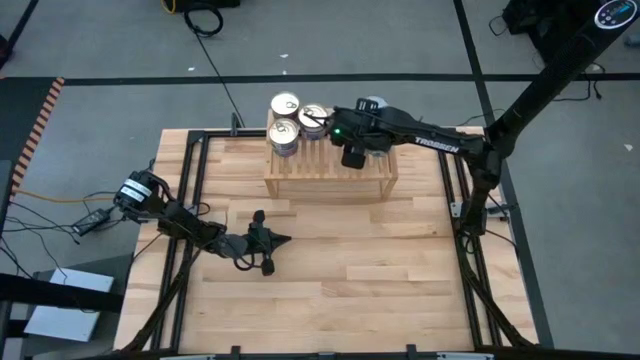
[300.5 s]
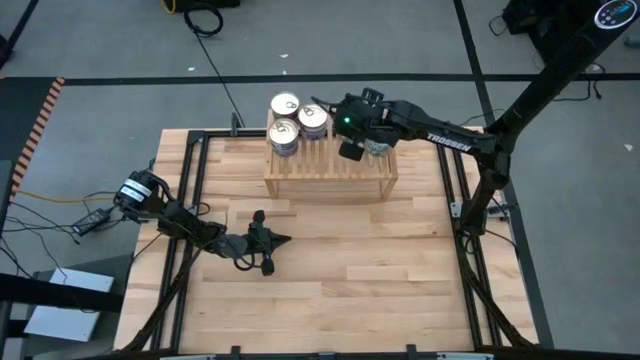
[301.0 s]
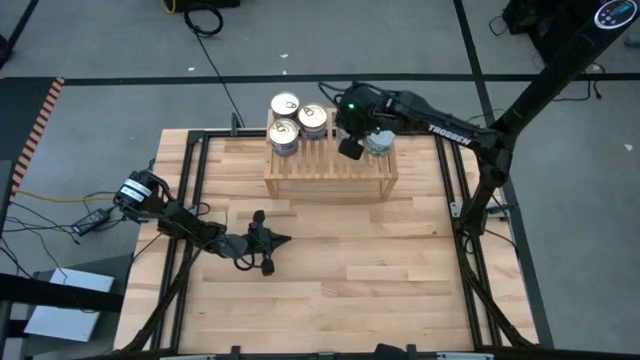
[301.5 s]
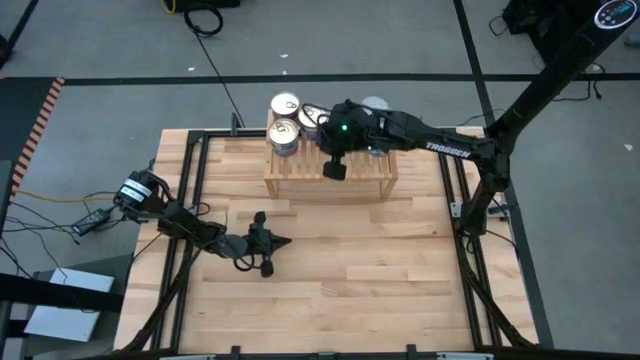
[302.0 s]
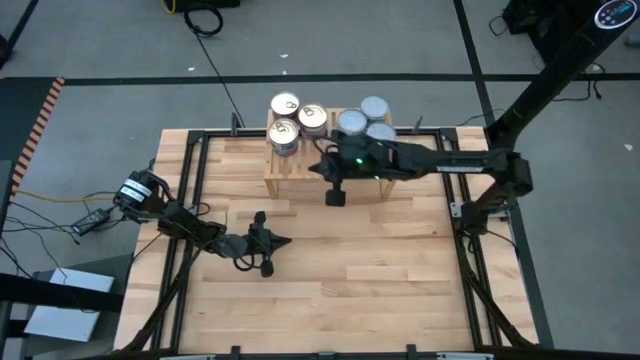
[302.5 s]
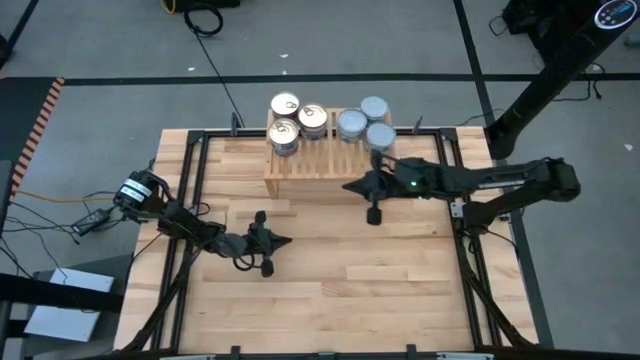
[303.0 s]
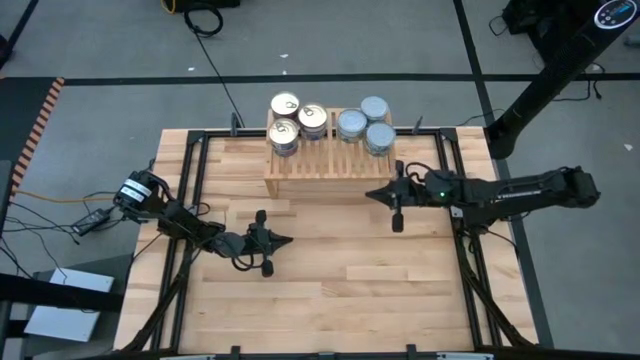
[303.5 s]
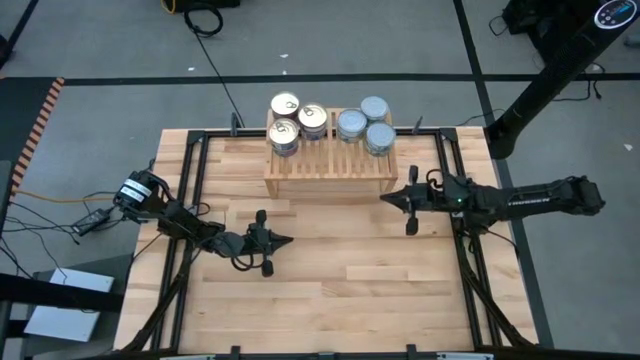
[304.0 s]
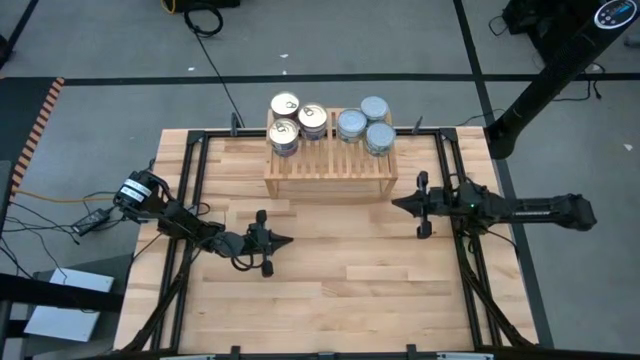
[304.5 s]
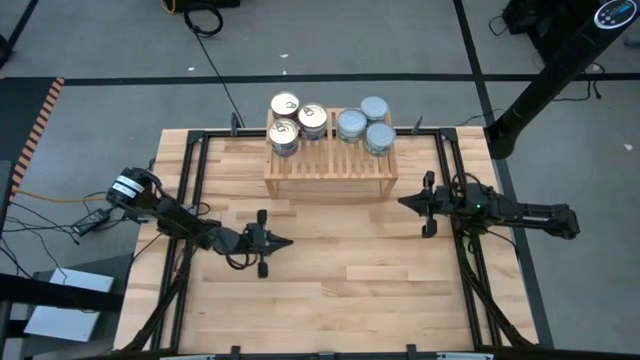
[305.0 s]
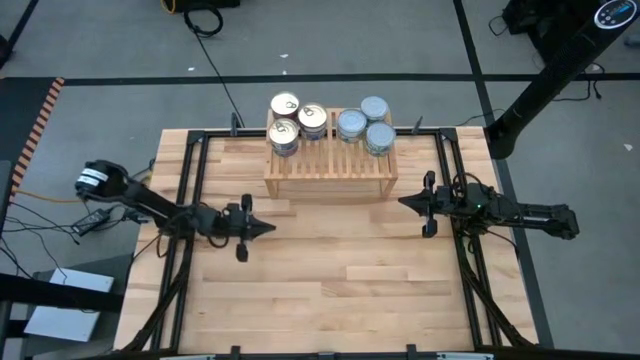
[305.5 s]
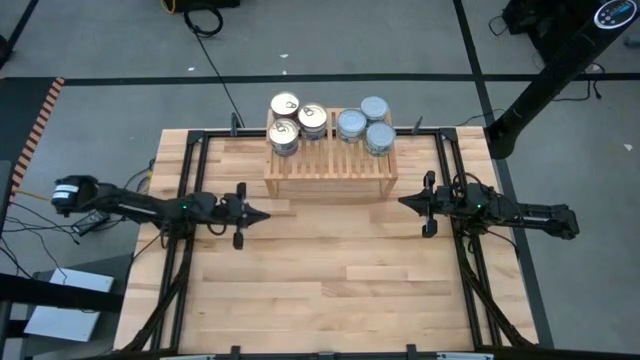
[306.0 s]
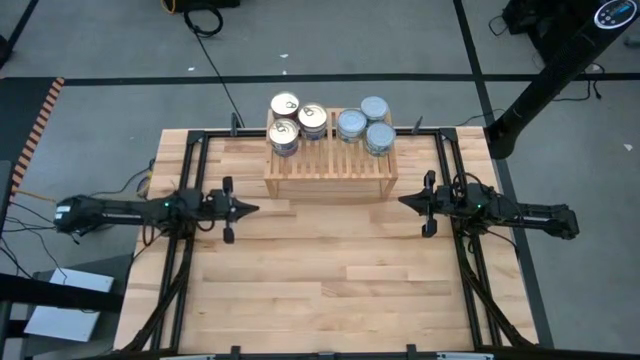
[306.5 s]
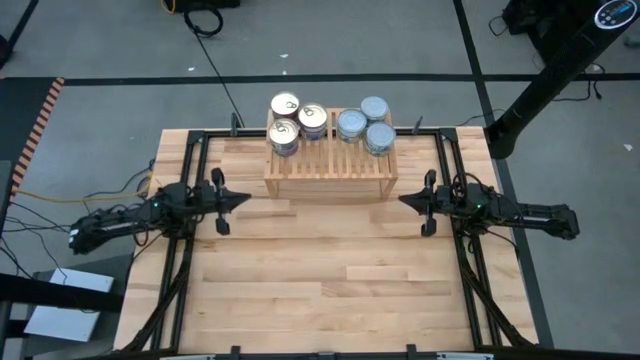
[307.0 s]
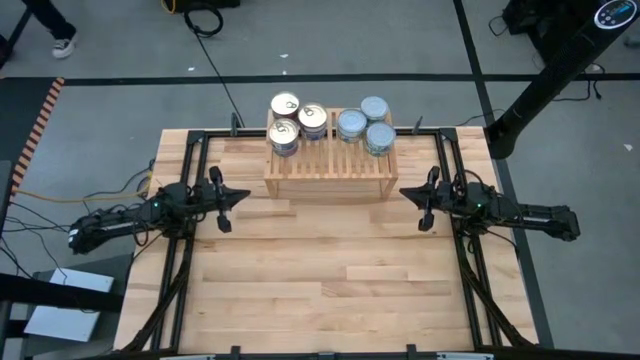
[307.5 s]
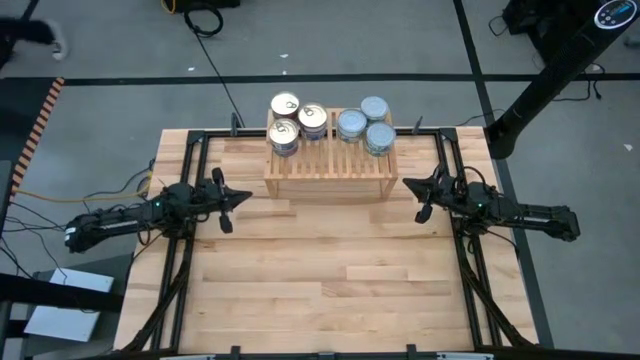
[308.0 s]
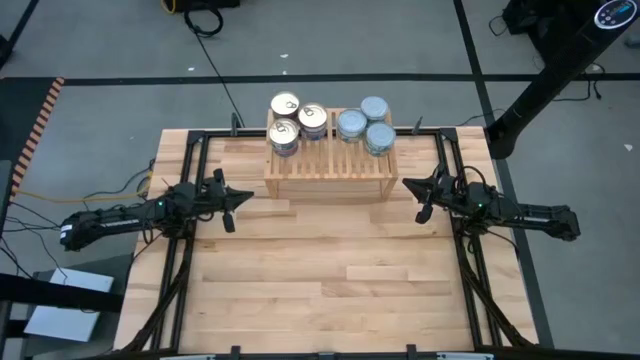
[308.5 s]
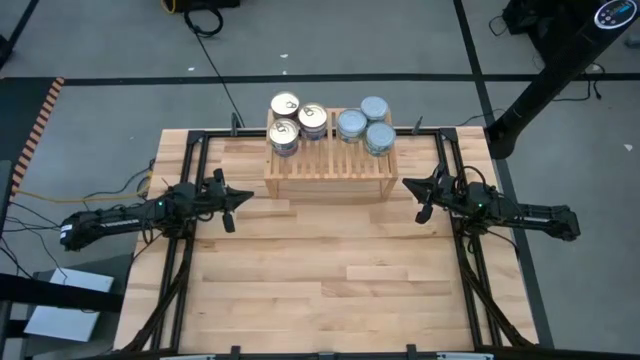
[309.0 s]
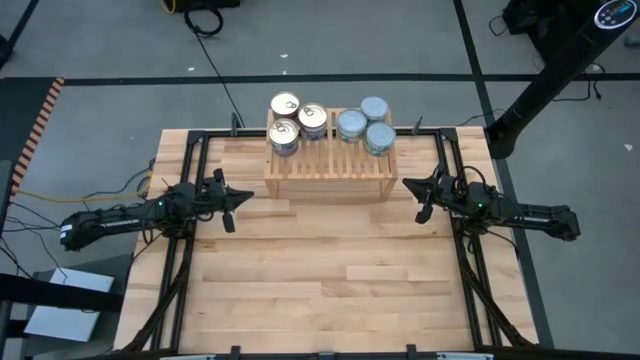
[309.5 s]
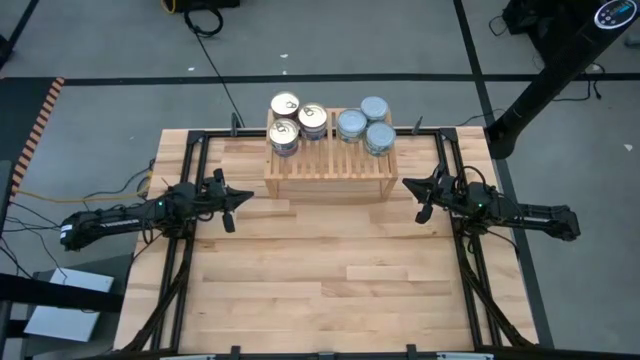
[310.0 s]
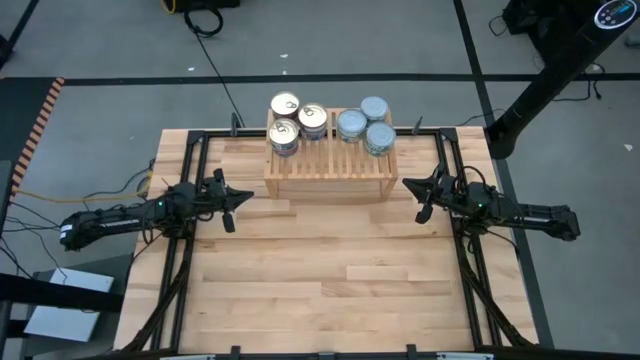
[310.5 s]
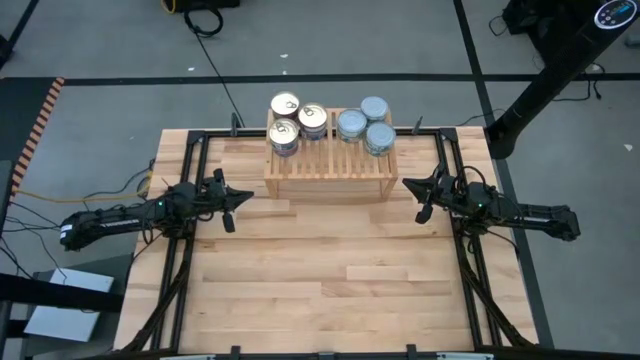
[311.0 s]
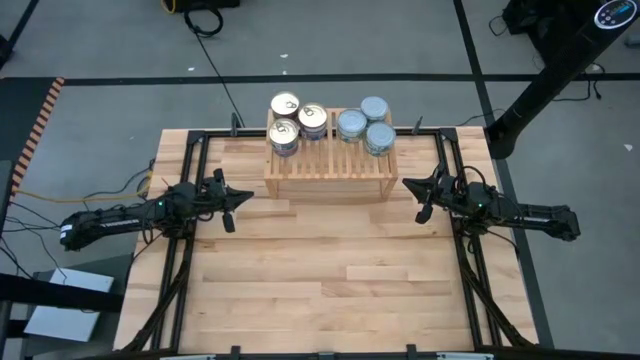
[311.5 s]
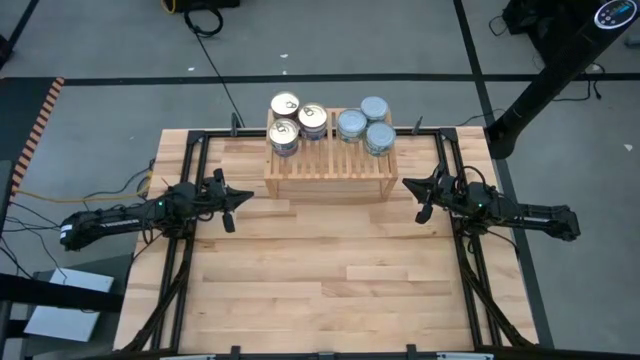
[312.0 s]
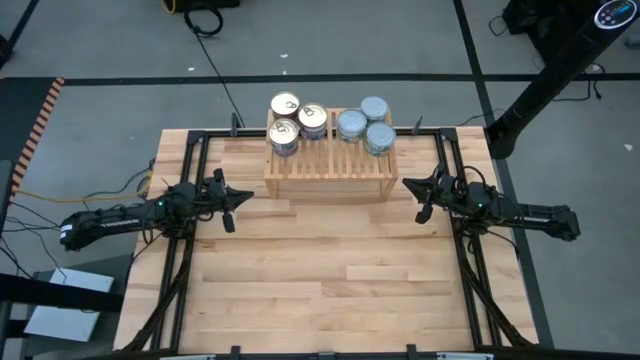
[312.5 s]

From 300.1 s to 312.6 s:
Task: Stack canned seafood by type on shelf
Return to Home Position
